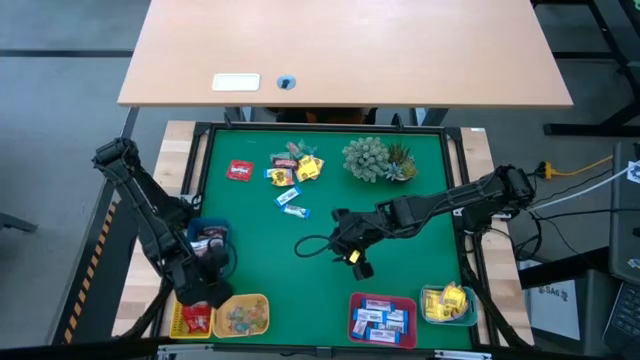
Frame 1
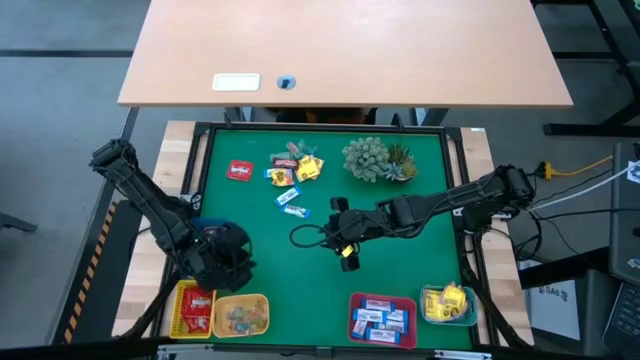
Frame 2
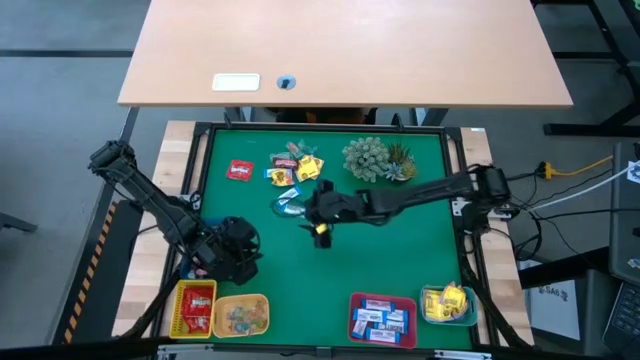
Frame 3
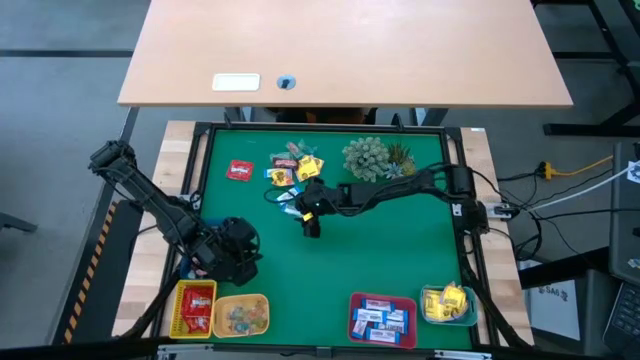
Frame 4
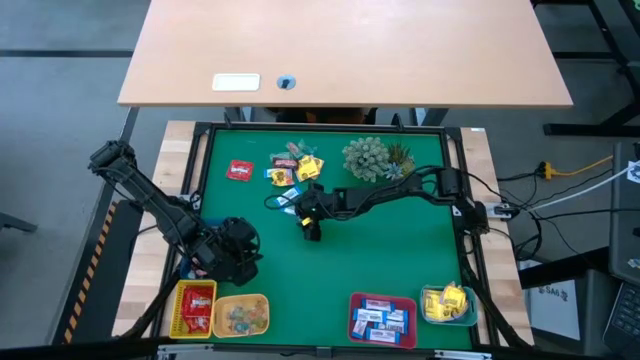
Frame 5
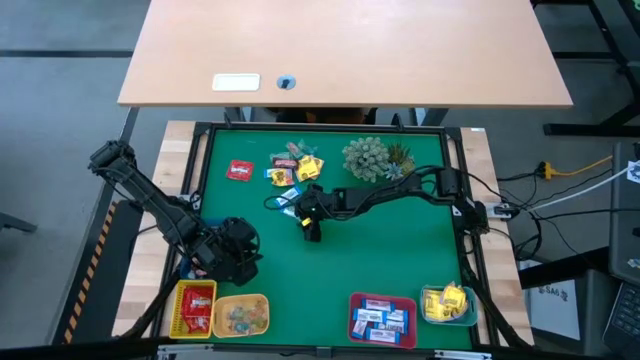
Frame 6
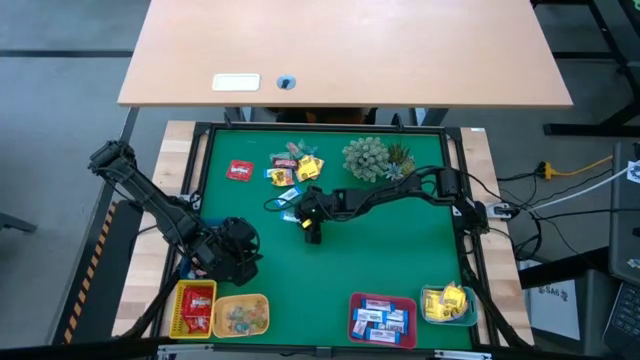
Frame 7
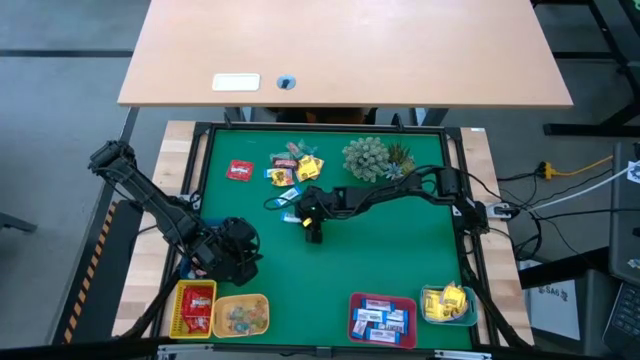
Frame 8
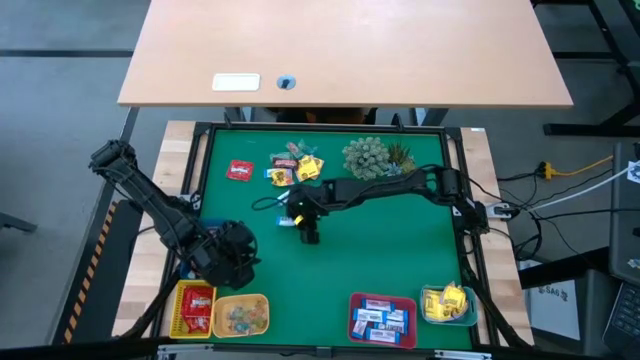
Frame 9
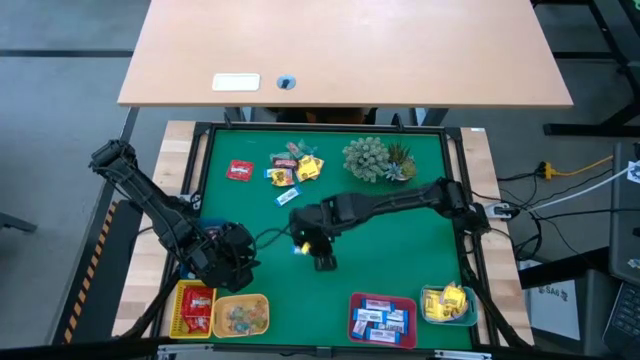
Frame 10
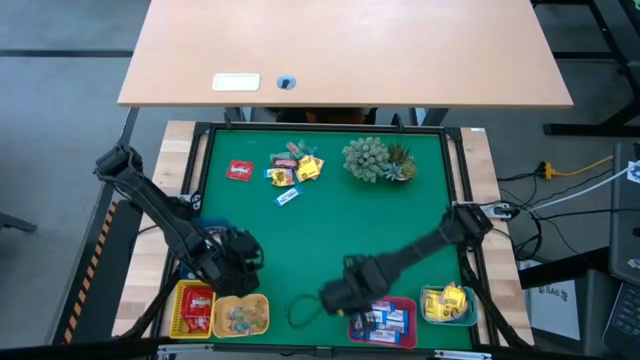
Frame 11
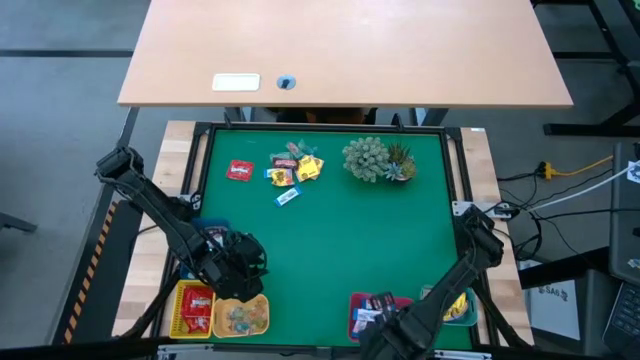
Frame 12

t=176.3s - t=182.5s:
Task: Sort candy
Put the blue chocolate into the red bin

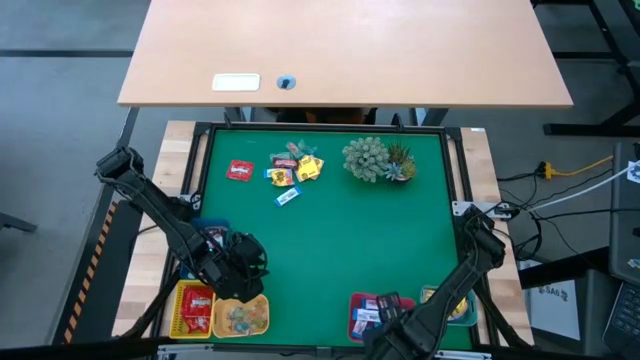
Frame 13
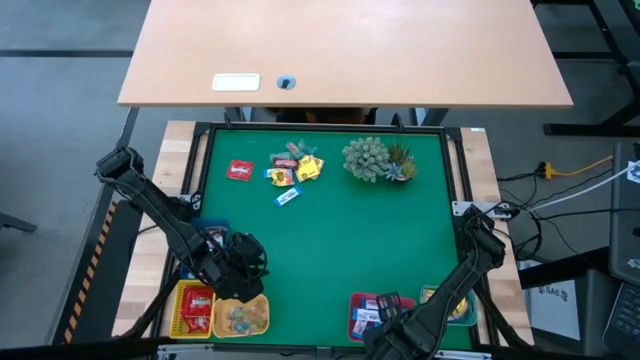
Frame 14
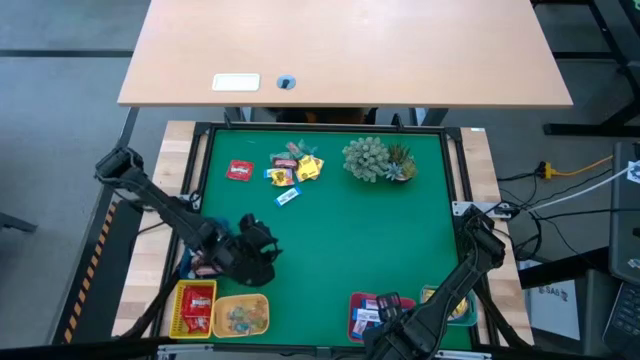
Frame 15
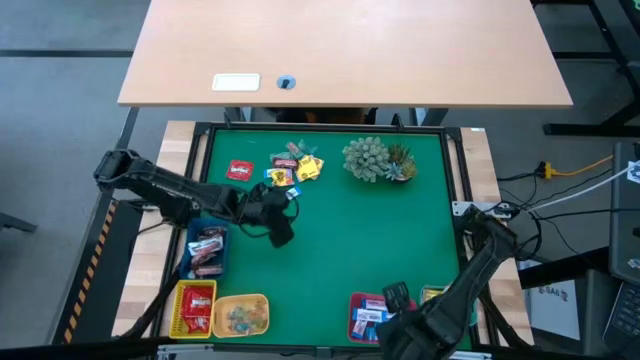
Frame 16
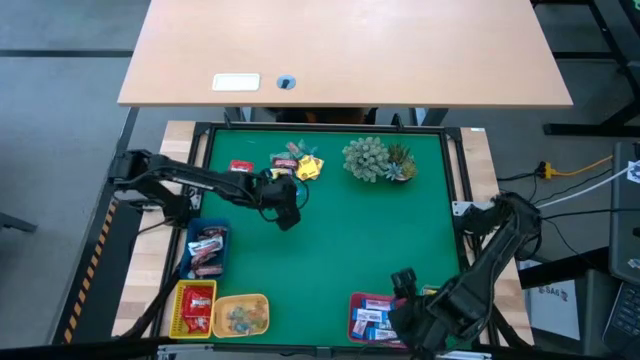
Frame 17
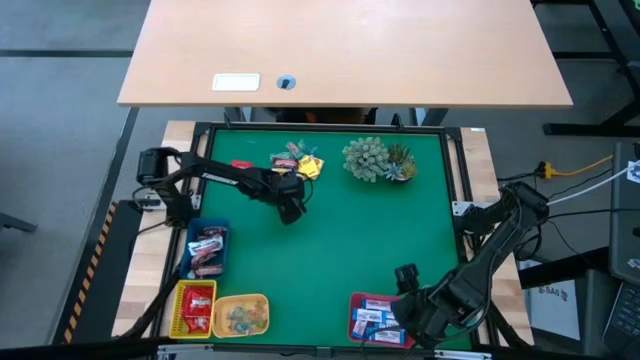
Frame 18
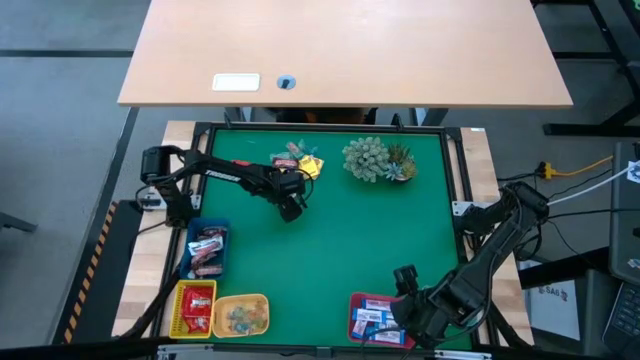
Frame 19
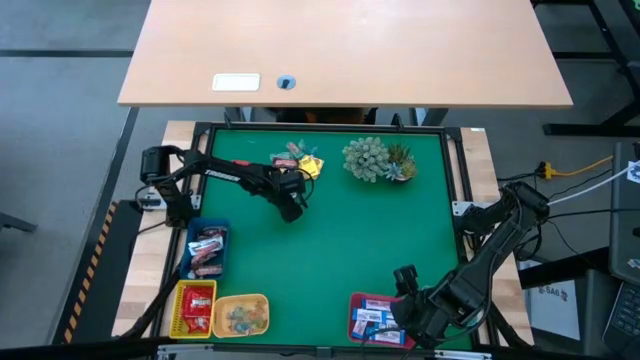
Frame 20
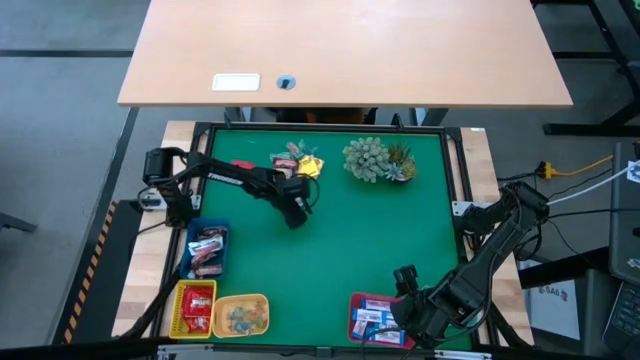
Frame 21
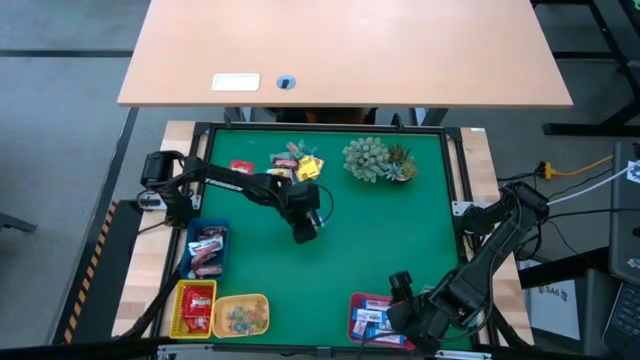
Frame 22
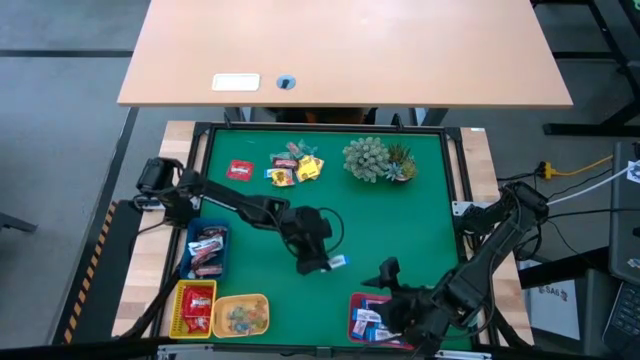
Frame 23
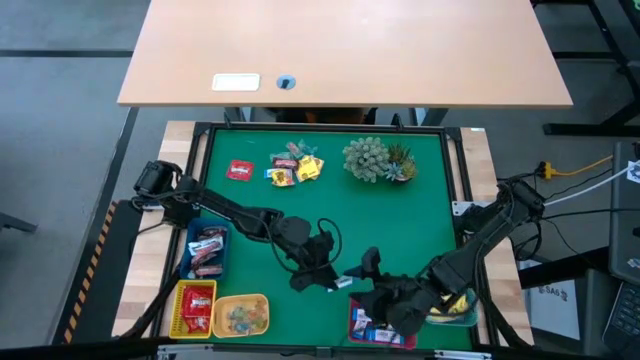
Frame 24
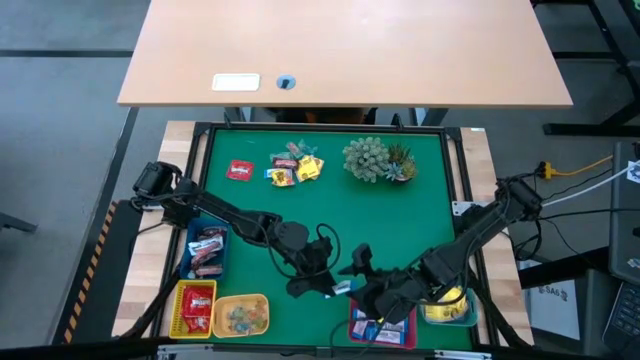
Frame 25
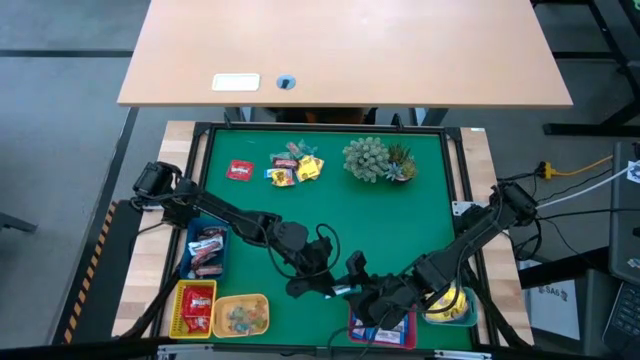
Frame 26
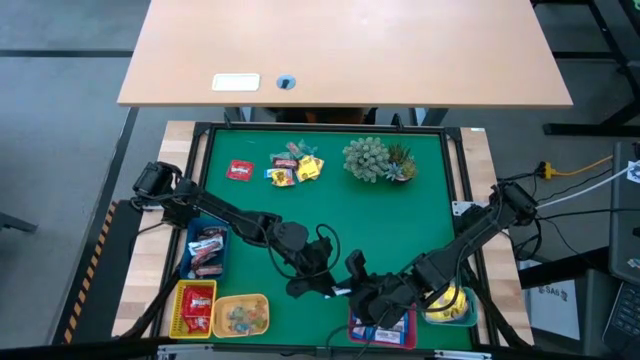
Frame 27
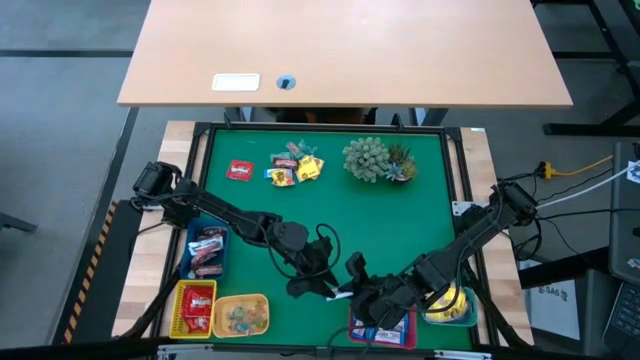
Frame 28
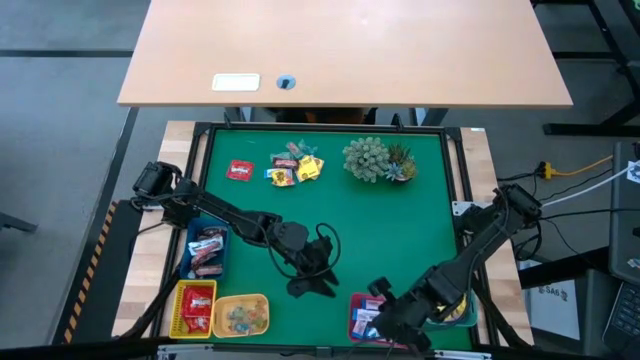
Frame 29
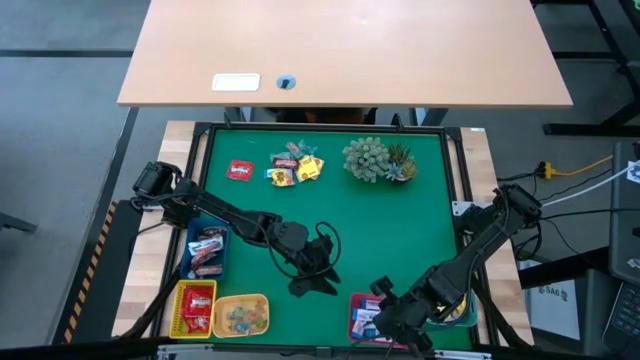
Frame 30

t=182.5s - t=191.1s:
Put the blue chocolate into the red bin

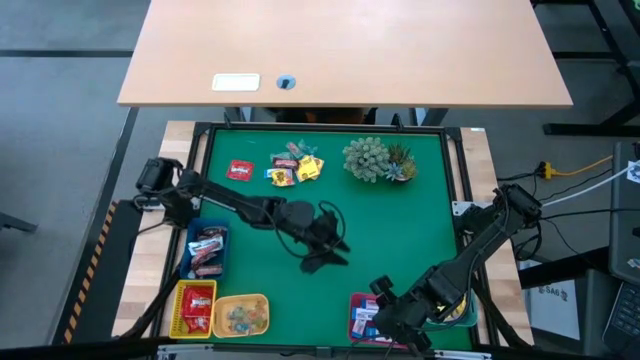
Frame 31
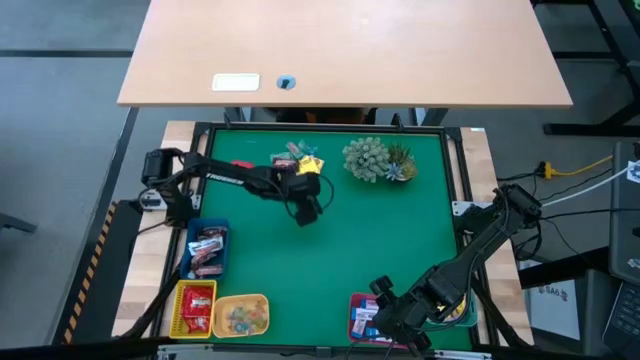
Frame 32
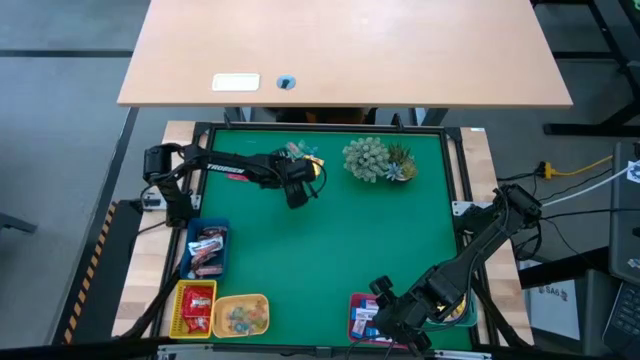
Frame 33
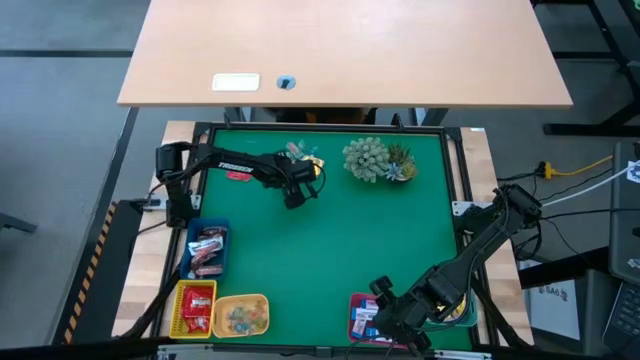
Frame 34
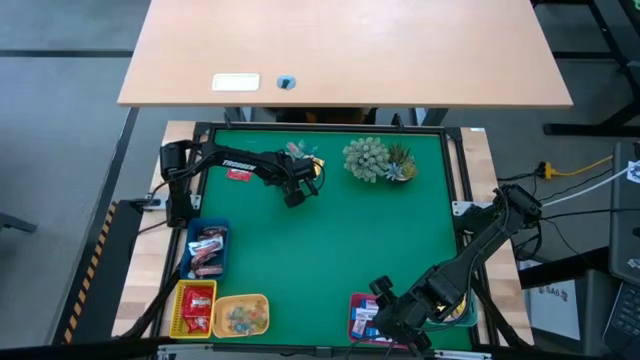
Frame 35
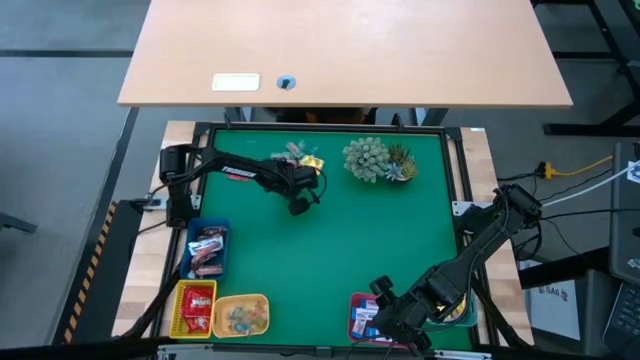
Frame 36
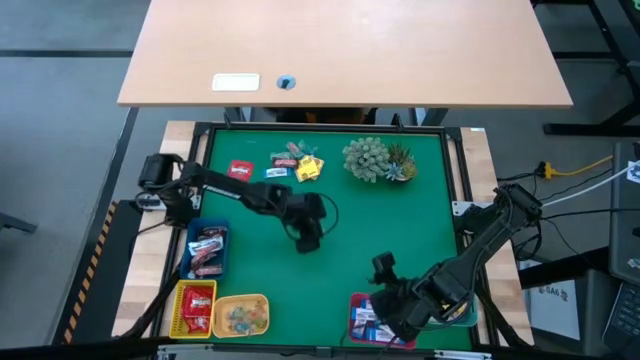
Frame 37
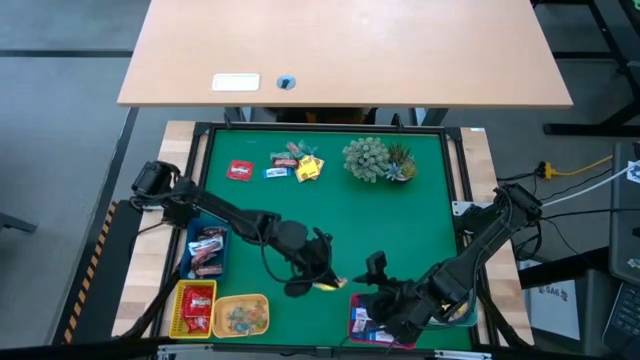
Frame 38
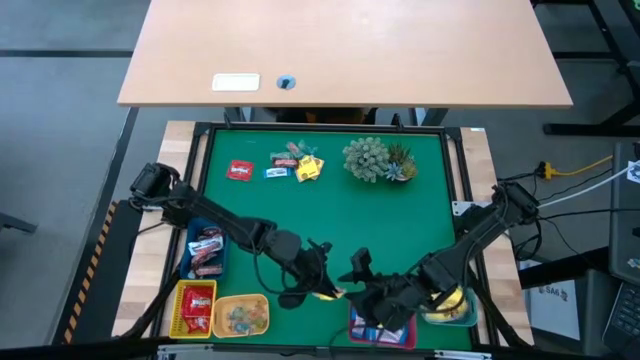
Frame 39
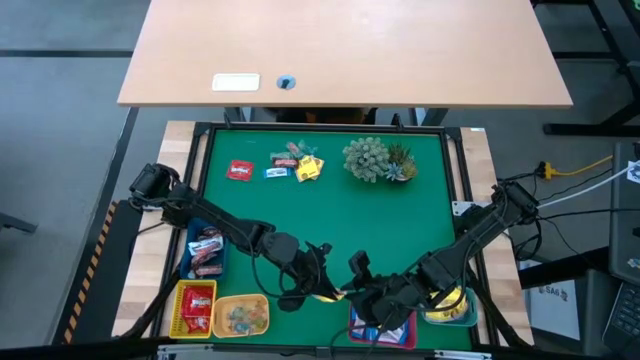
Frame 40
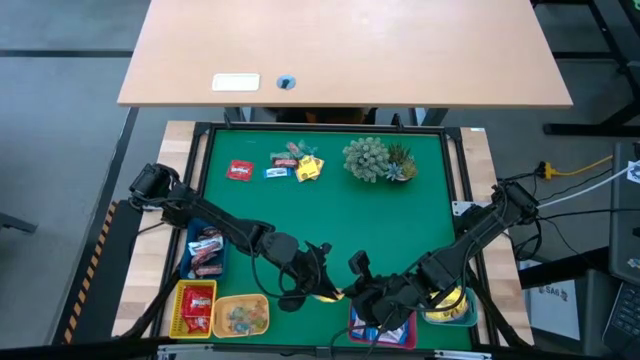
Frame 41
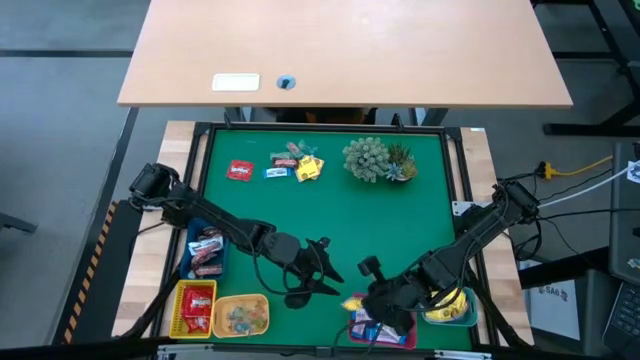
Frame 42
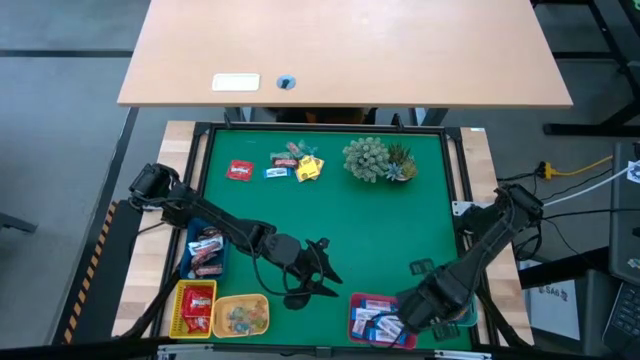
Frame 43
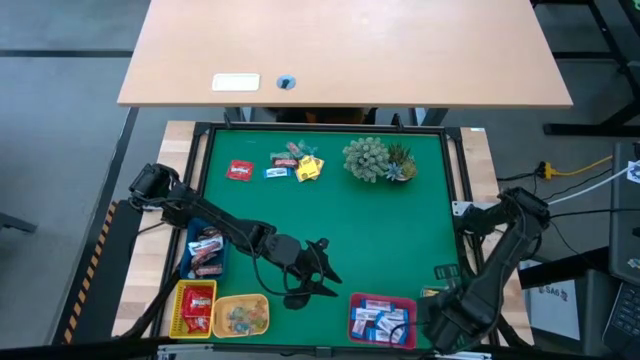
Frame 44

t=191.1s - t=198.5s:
Put the yellow candy into the green bin
